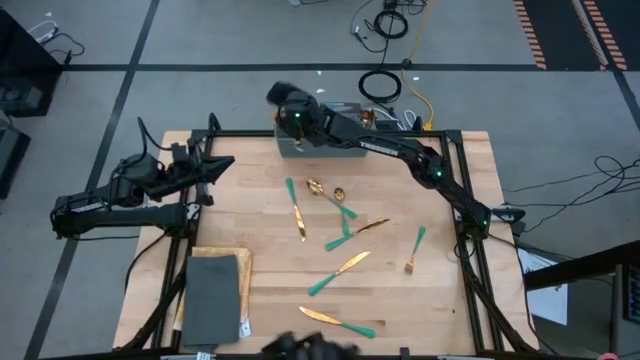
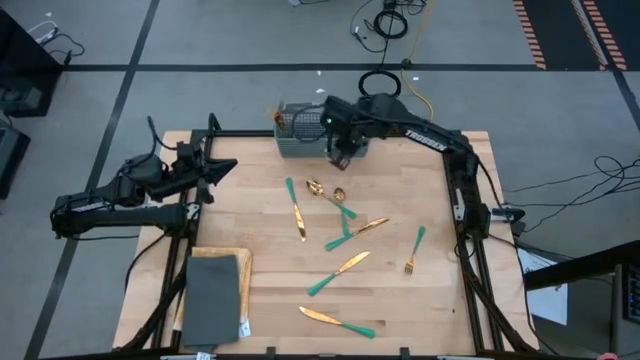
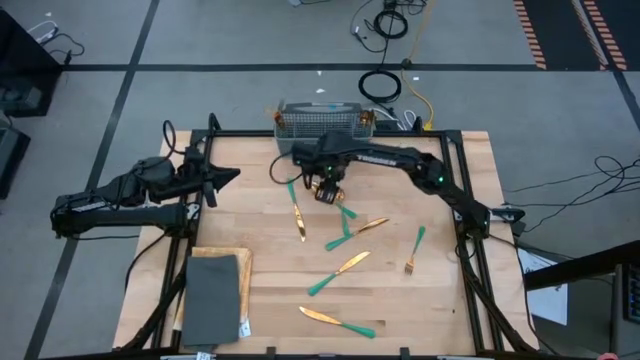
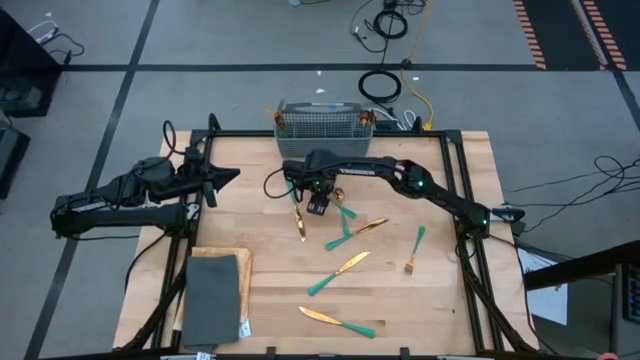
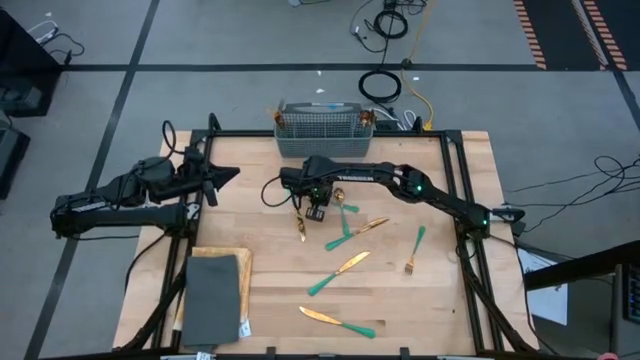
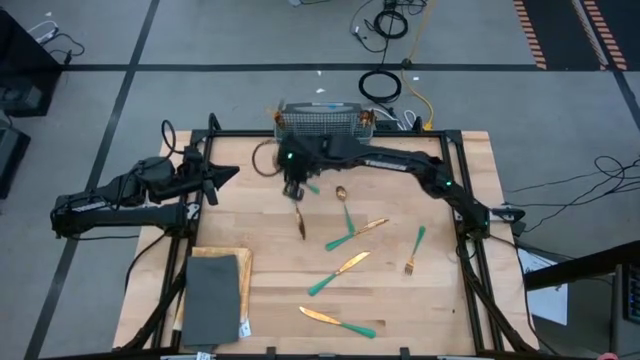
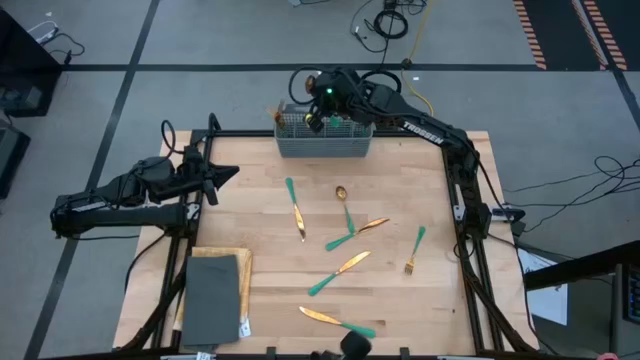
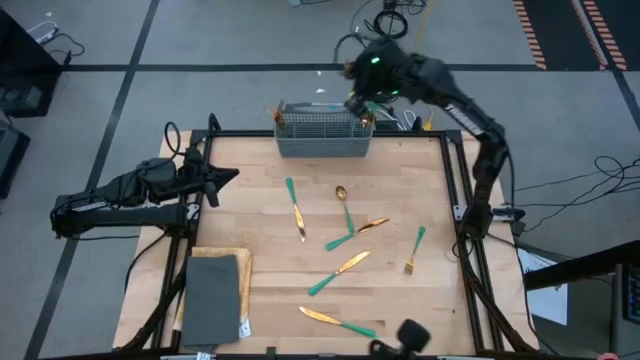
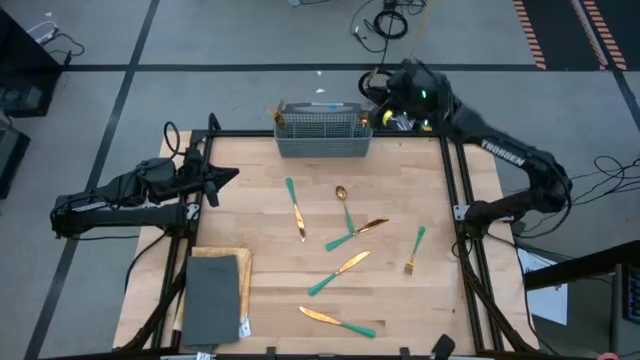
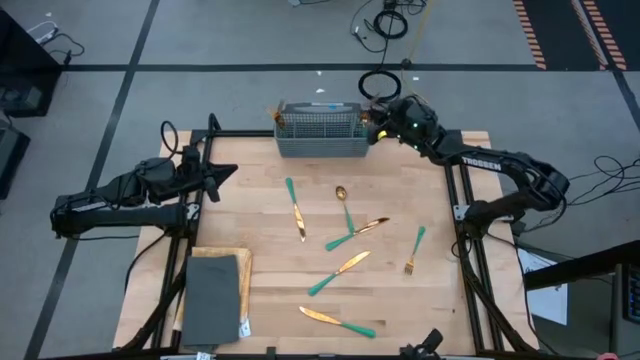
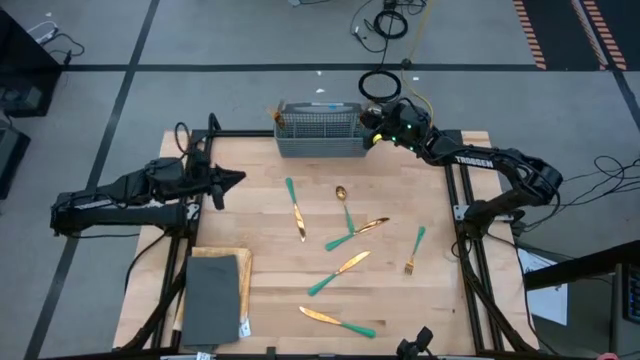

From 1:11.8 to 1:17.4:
Task: Sort silverware
Put the green spoon into the silverware basket

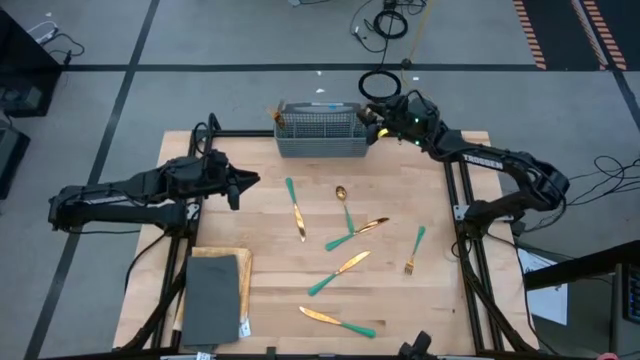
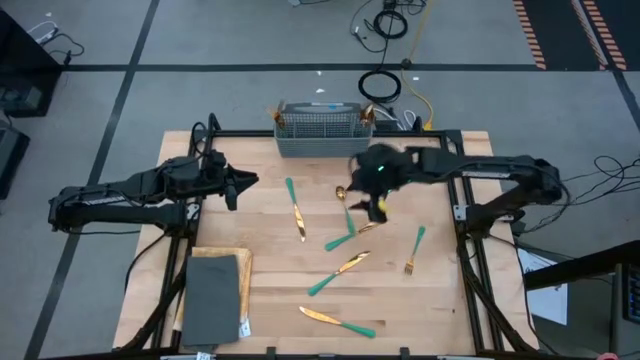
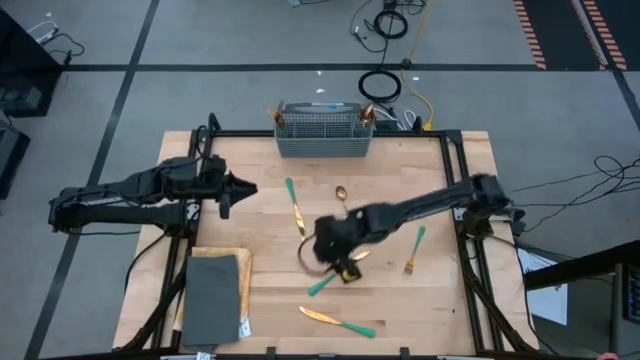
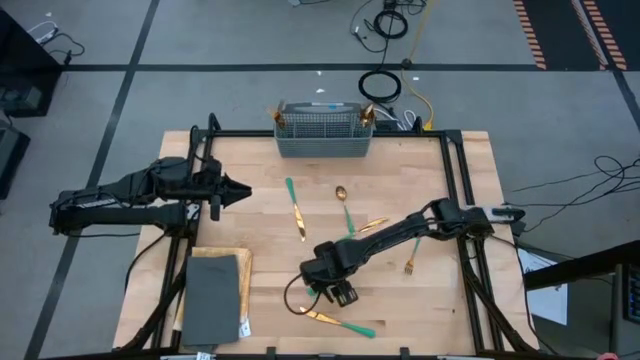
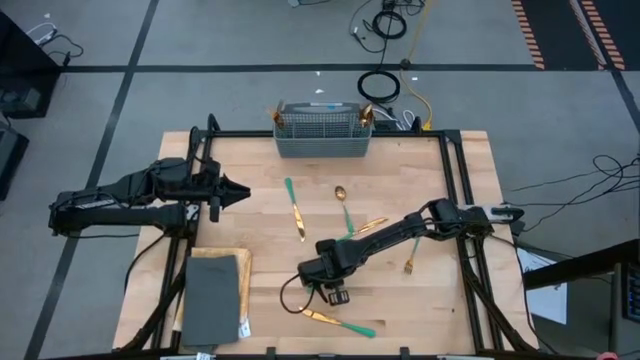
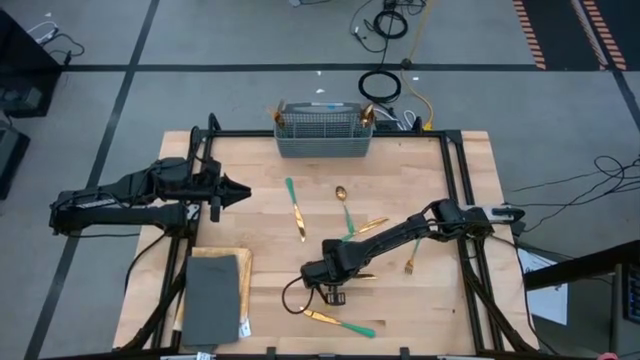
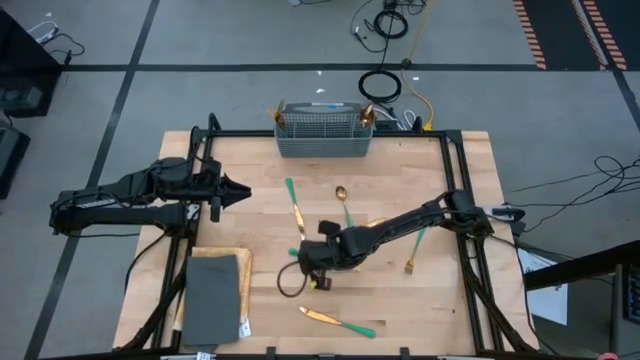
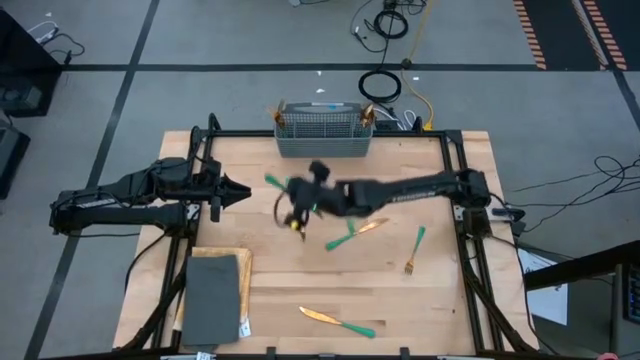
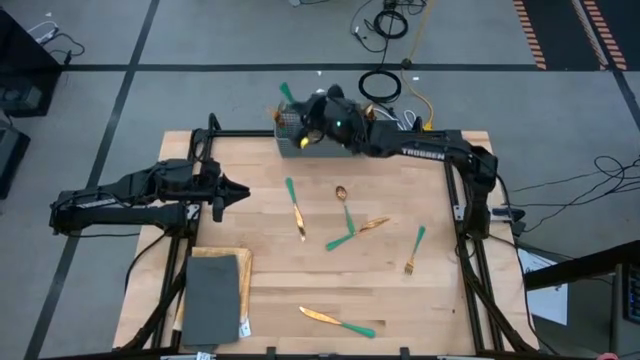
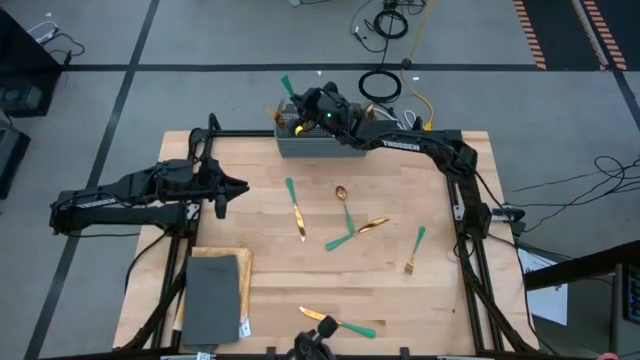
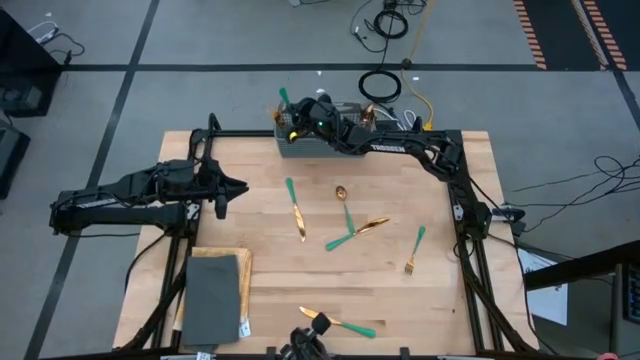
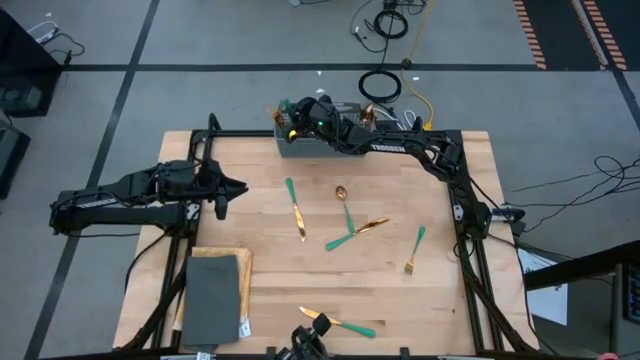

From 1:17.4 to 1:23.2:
Put the green knife into the silverware basket

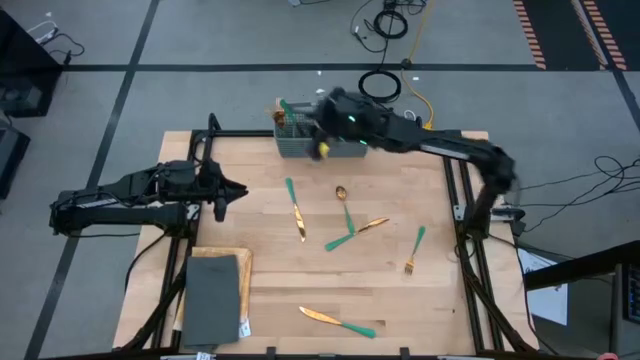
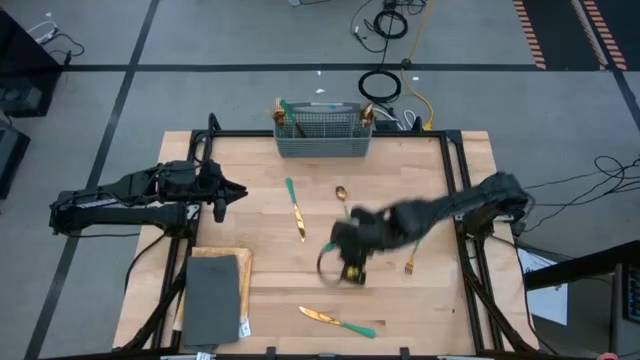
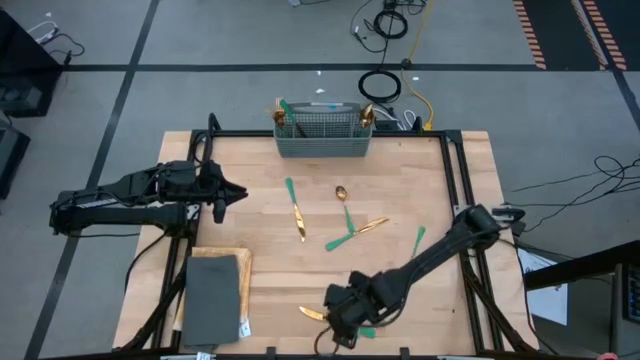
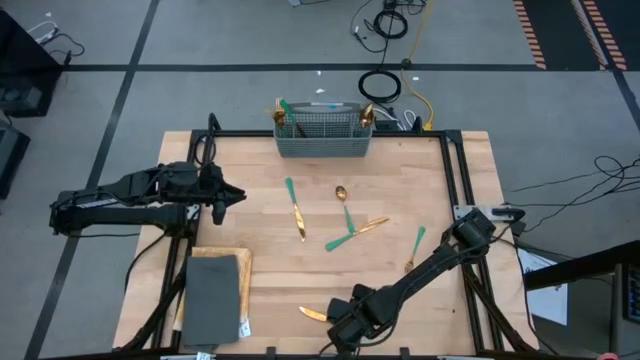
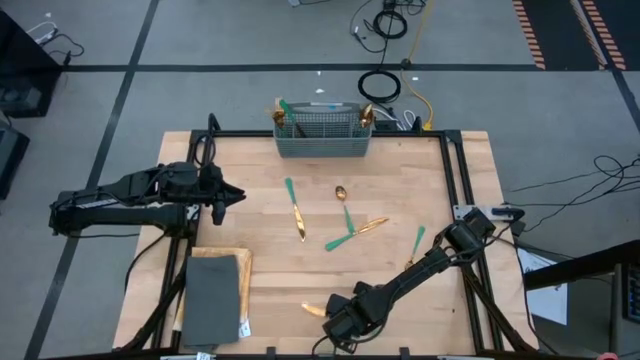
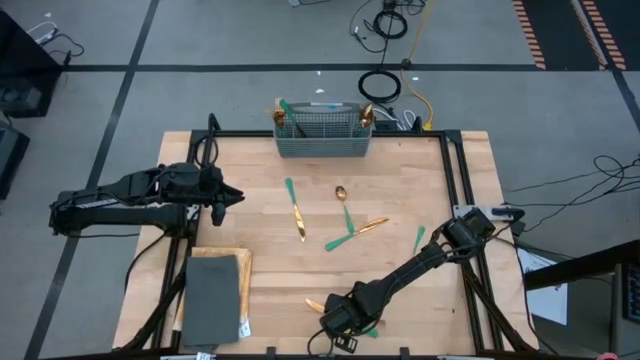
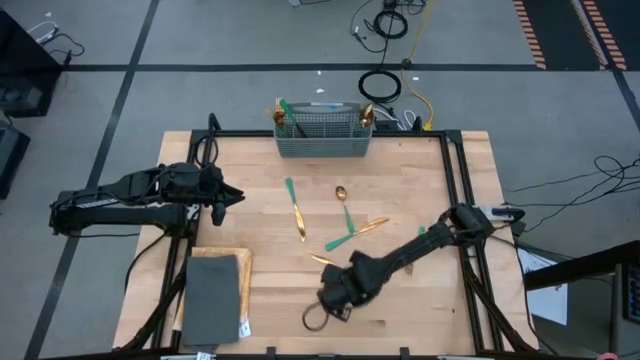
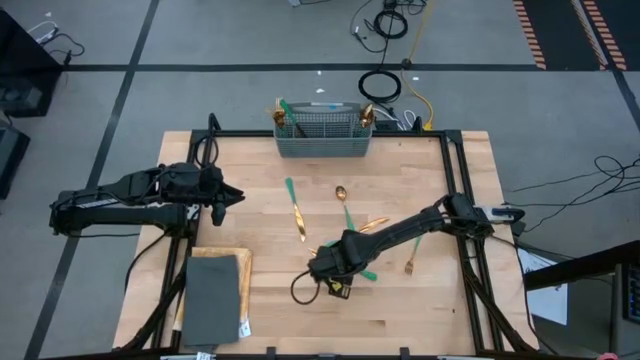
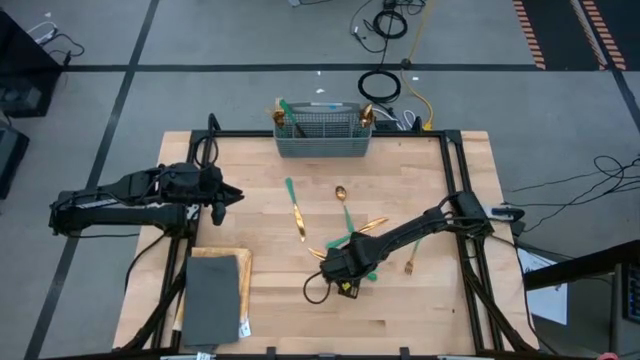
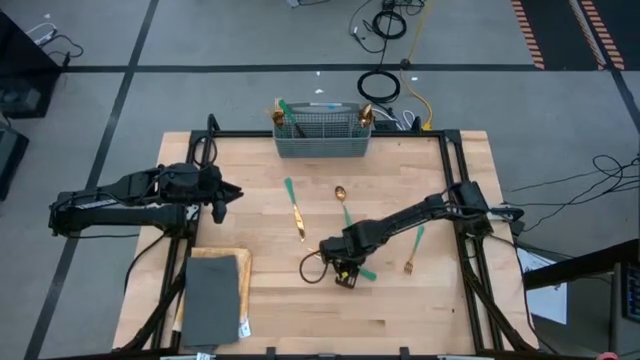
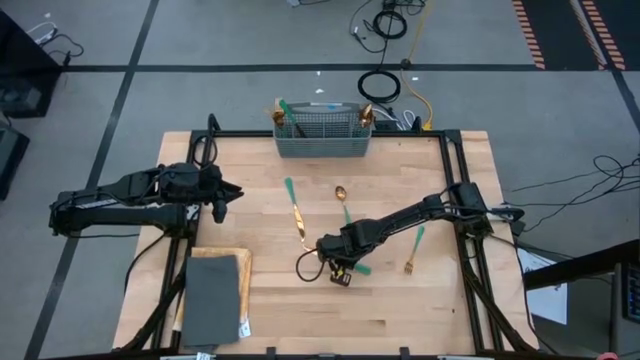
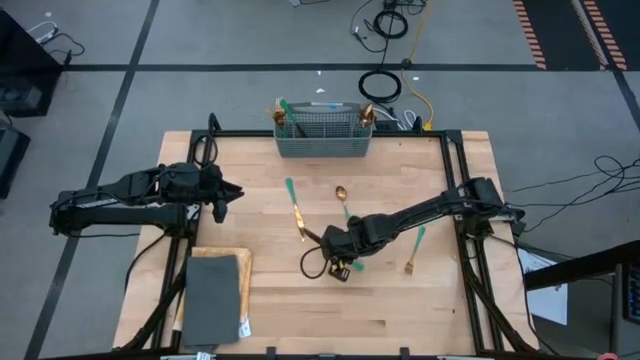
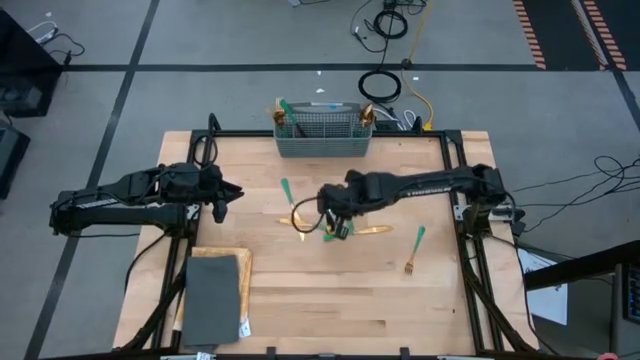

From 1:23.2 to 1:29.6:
Put the bottom green knife into the silverware basket

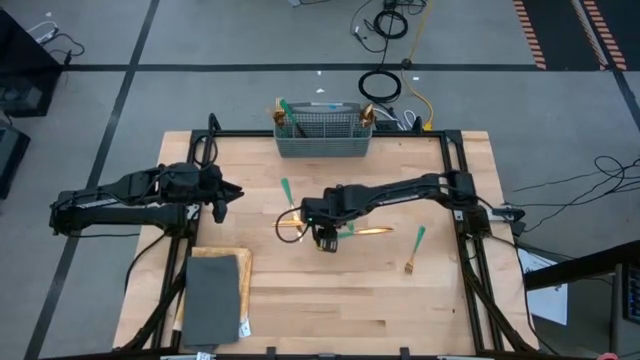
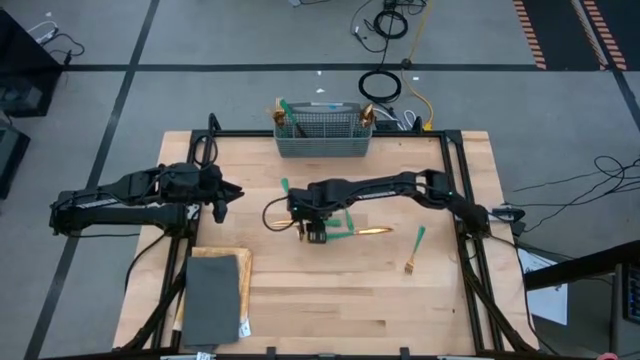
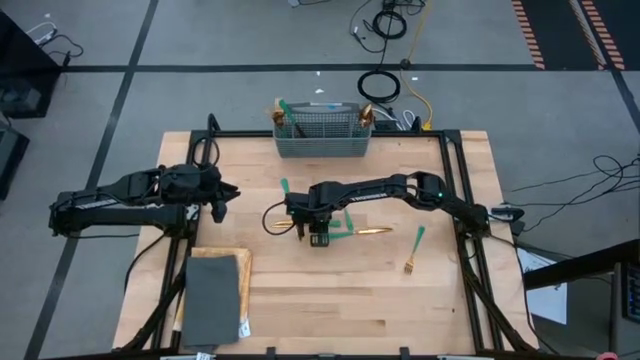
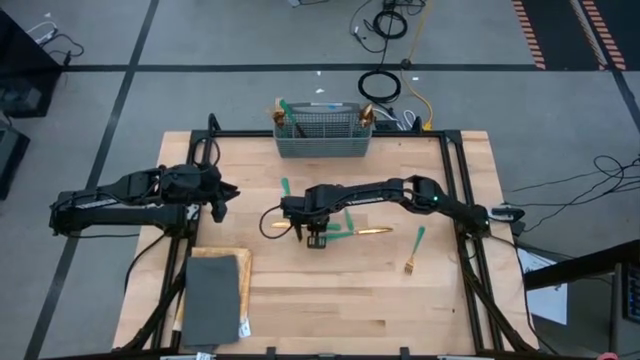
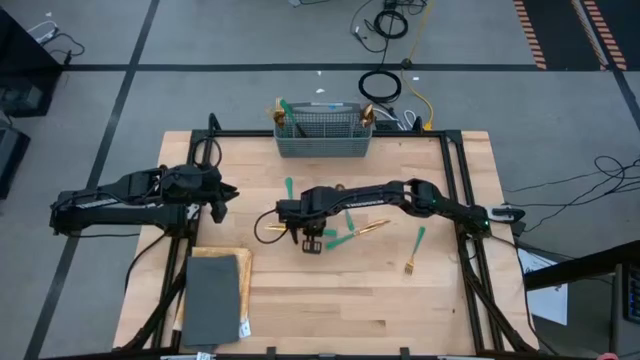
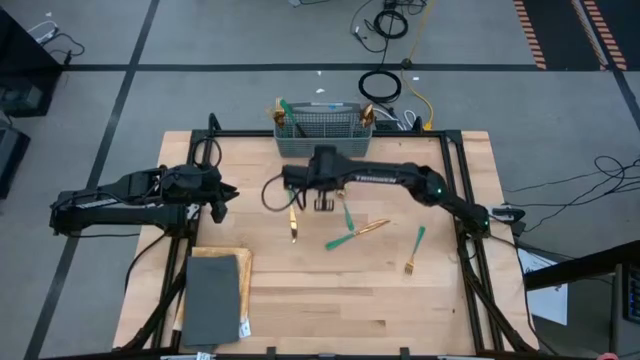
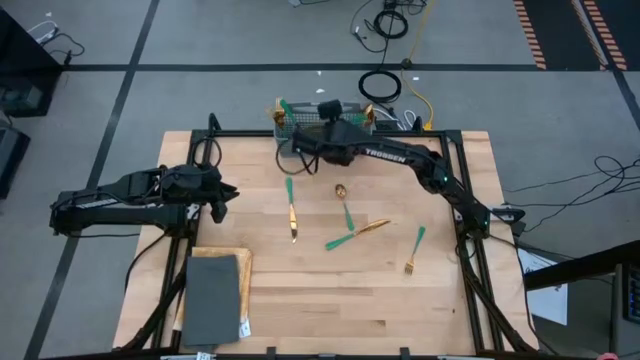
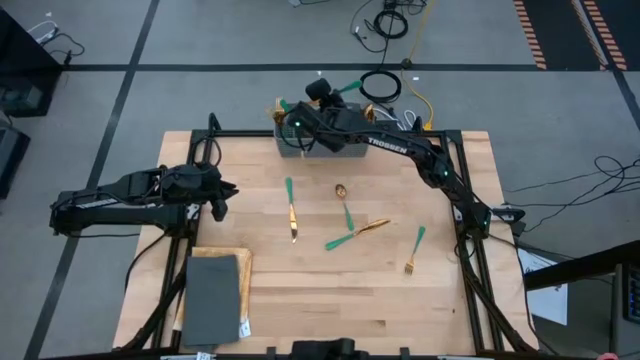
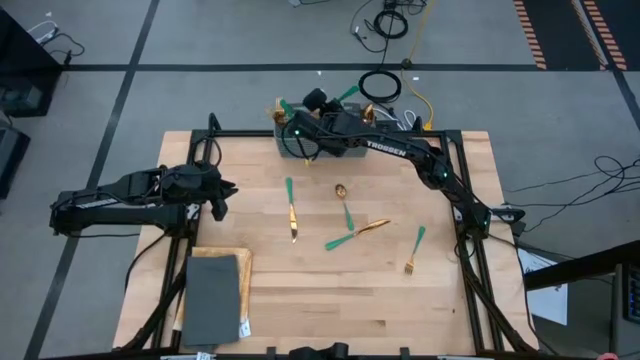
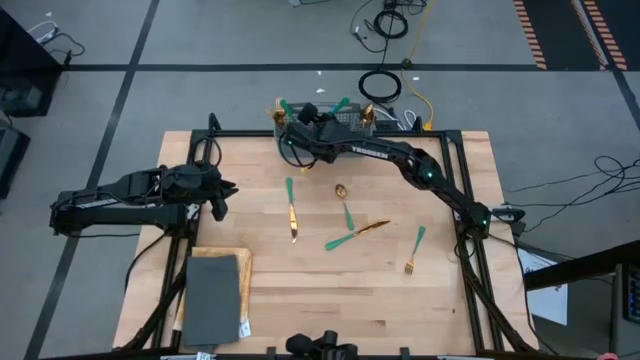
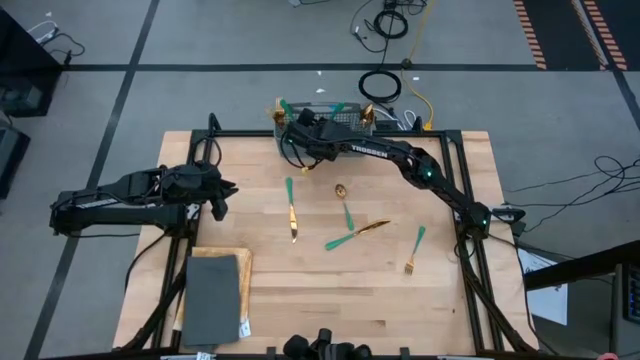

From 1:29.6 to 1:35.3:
Put the bottom green knife into the silverware basket
